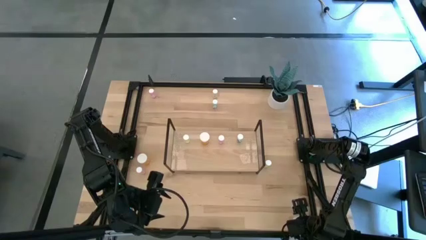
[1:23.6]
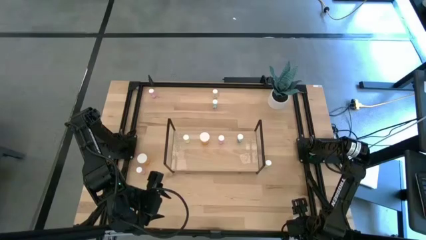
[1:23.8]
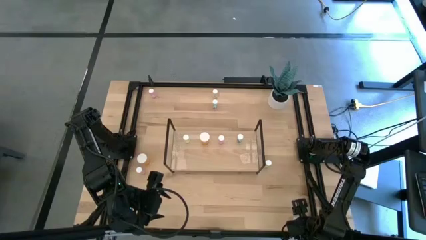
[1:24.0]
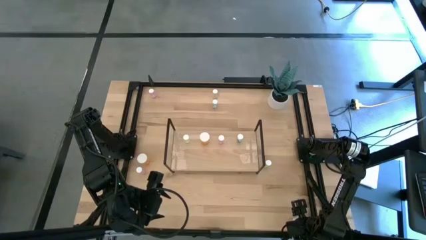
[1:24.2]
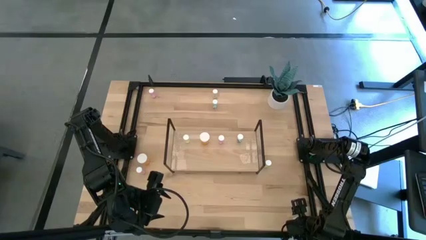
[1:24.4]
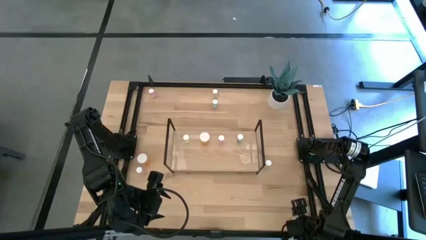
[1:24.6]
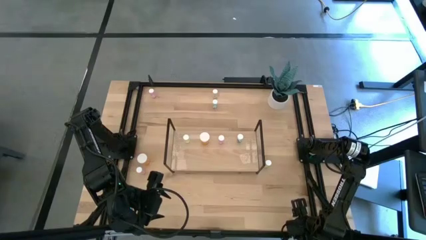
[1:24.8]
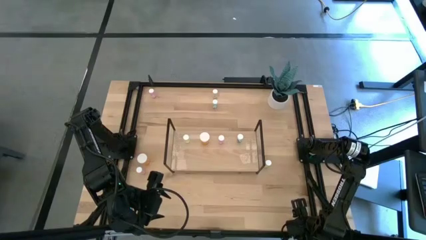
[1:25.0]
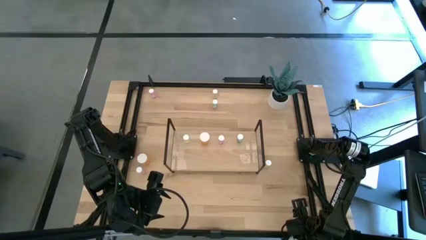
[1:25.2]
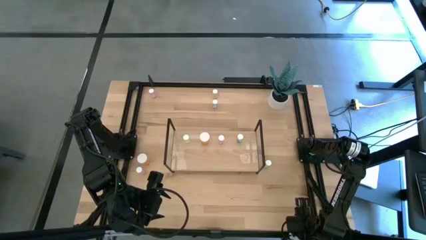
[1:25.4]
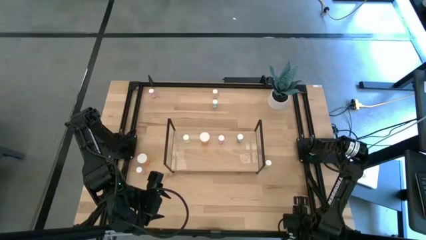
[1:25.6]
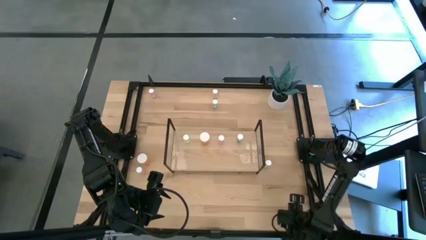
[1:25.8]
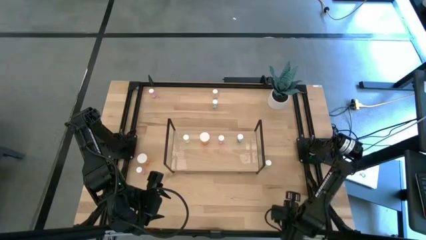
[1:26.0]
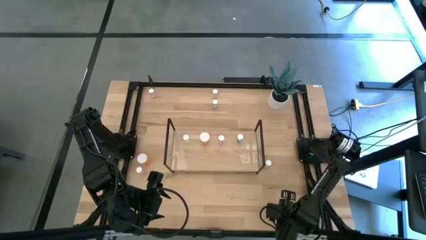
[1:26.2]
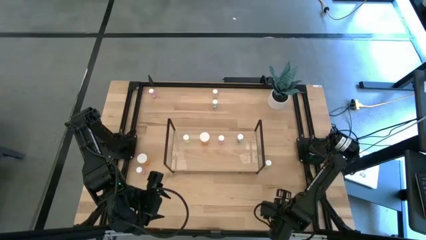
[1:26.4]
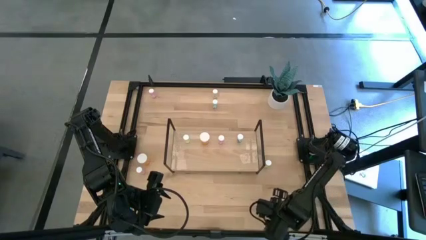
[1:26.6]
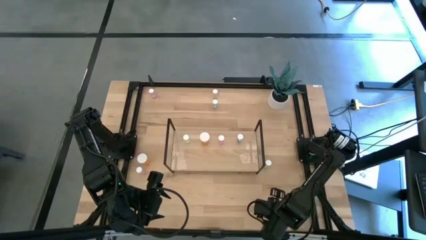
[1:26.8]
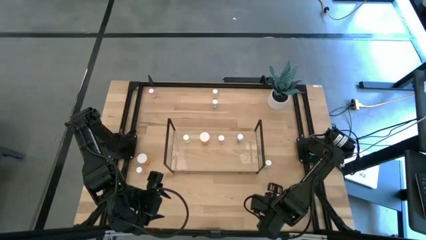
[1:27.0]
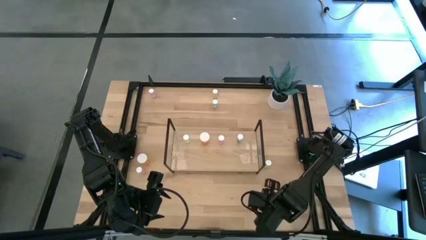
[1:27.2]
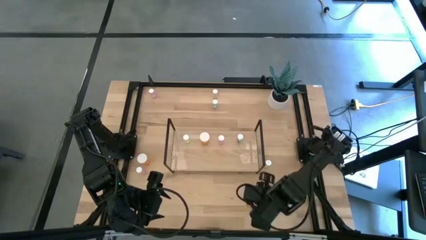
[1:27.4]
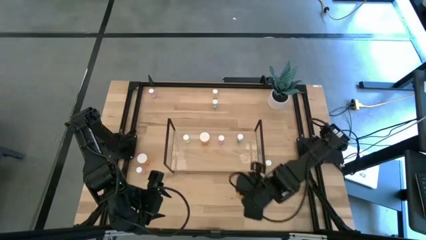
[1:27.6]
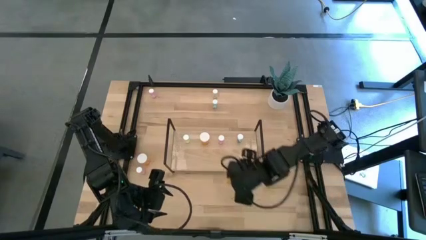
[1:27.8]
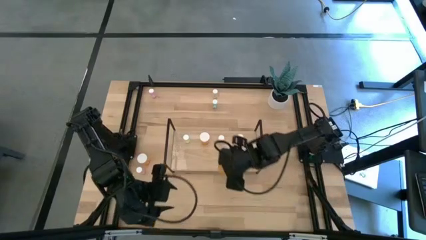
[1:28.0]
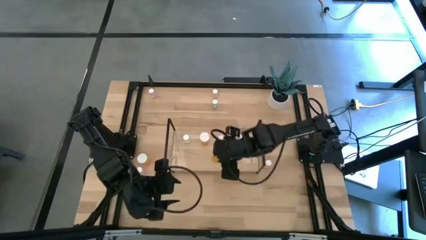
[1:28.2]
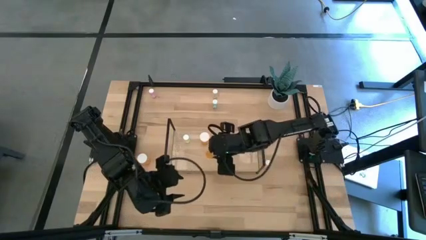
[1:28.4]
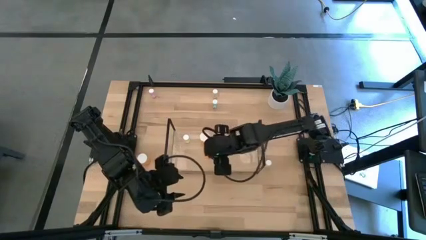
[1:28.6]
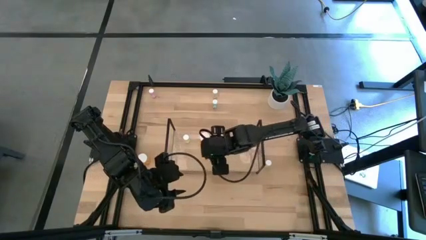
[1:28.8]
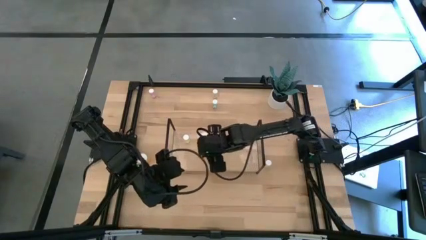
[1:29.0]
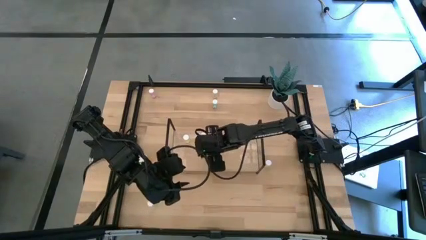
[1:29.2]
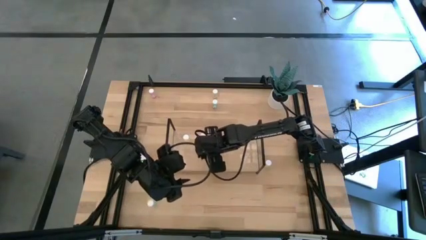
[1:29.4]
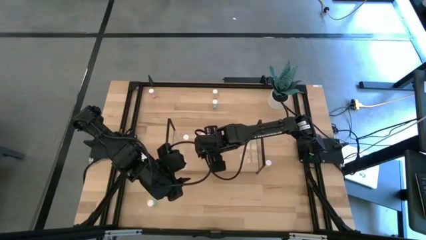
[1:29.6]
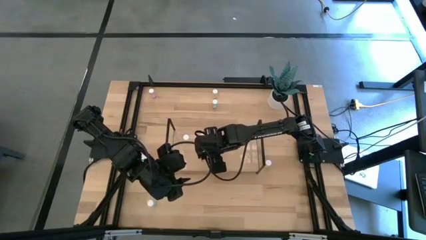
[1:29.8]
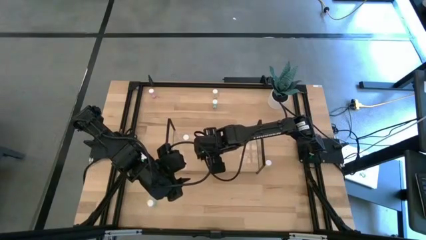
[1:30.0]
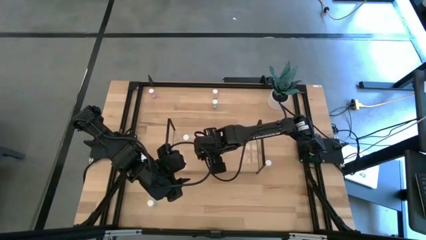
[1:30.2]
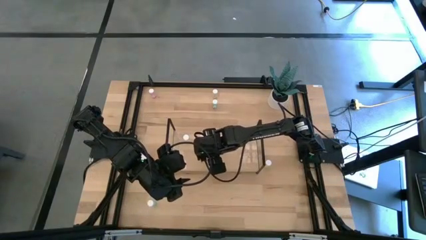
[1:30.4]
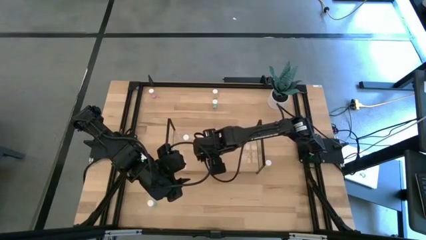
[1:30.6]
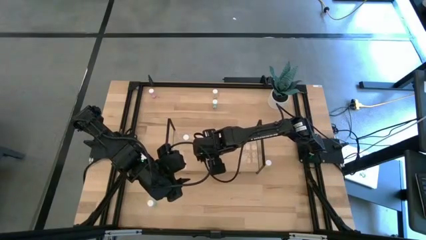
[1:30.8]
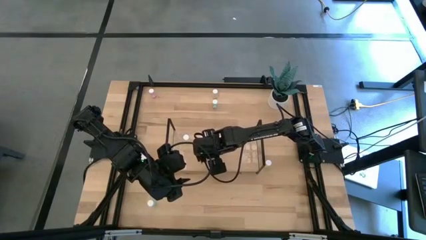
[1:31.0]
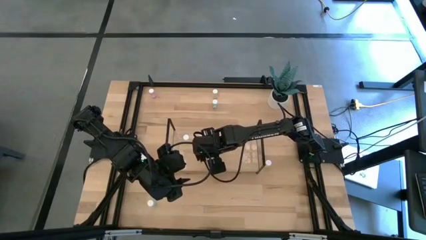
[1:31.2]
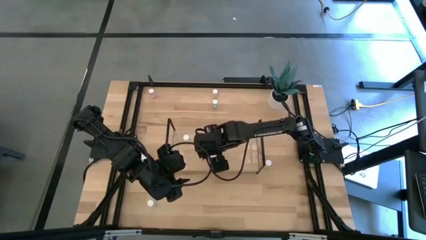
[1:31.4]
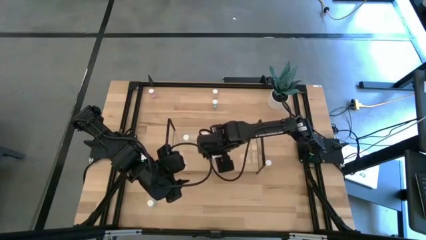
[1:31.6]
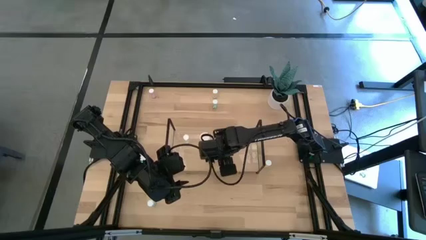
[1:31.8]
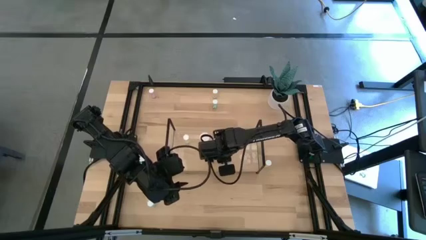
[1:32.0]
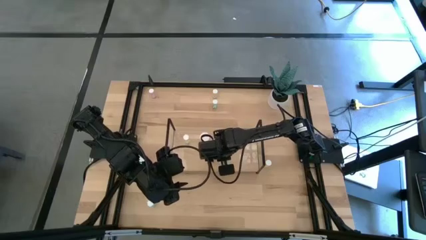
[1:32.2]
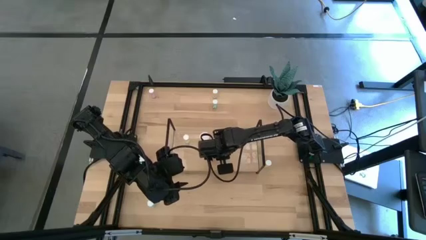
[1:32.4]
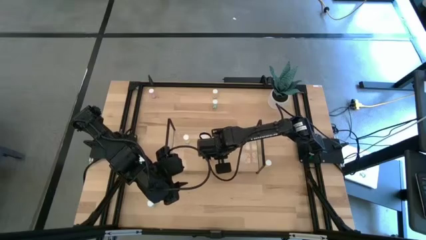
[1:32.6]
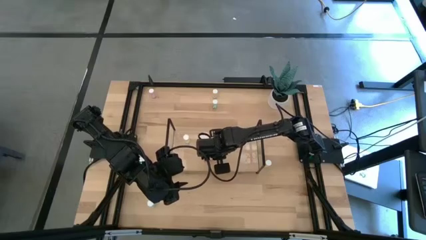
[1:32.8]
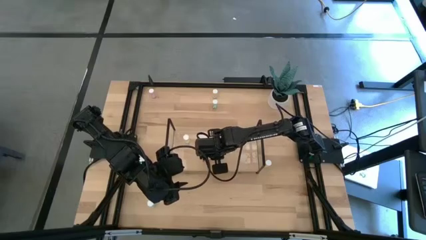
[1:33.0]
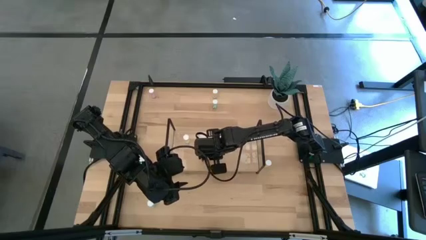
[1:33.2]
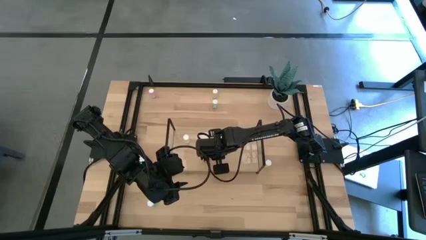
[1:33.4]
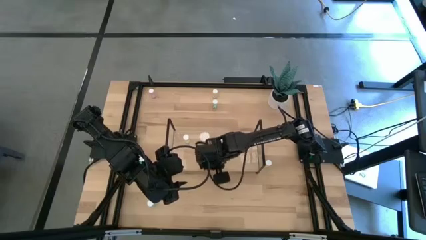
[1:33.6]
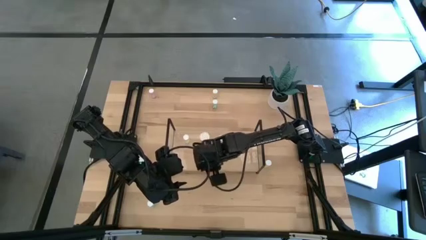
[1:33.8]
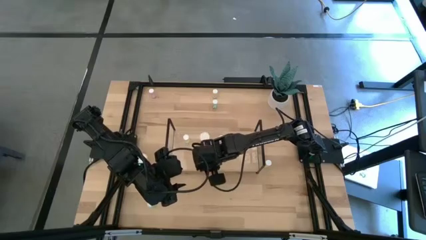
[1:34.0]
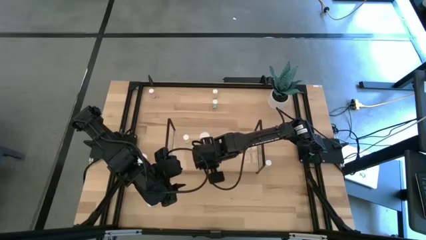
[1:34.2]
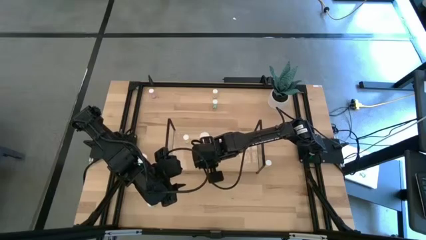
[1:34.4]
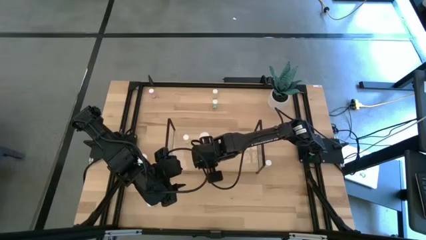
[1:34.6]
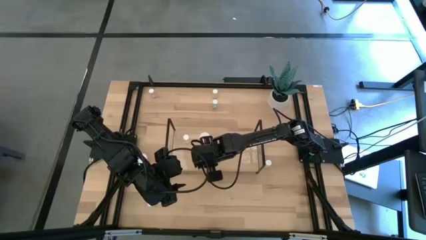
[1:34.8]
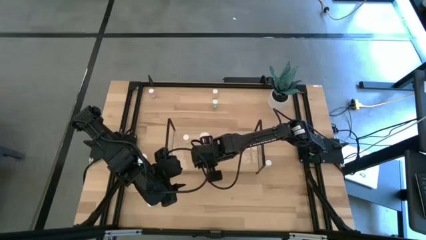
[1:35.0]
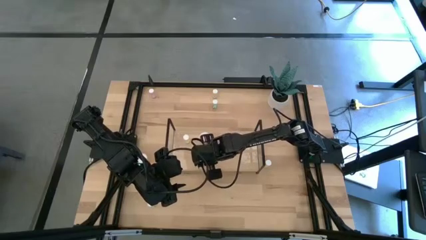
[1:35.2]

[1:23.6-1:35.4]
Task: Pick and place medicine bottles onto shelf by color
Put the bottom orange pill bottle aligned with the orange pill bottle on the shelf

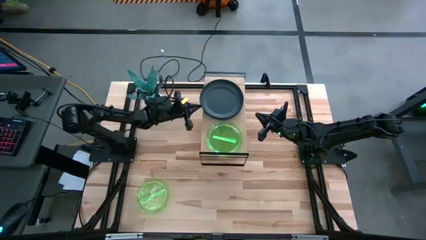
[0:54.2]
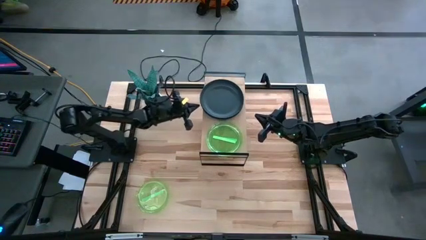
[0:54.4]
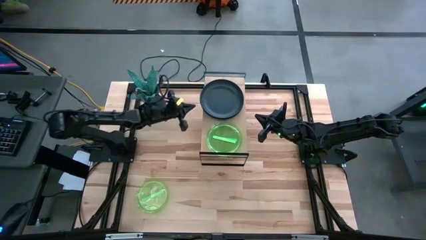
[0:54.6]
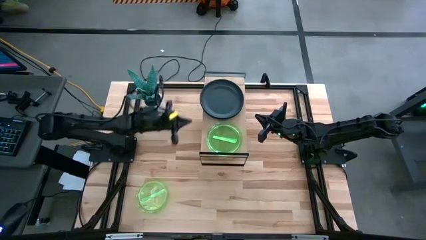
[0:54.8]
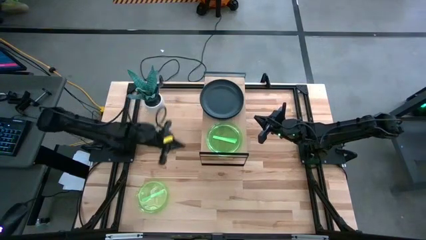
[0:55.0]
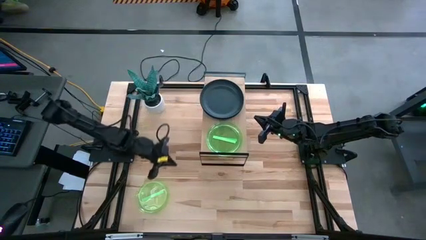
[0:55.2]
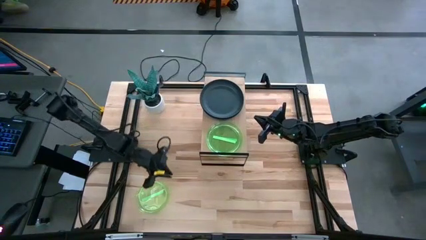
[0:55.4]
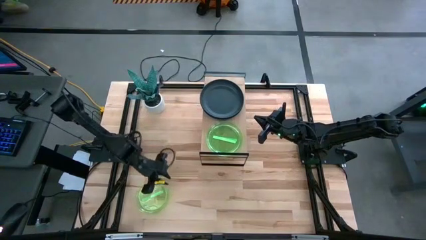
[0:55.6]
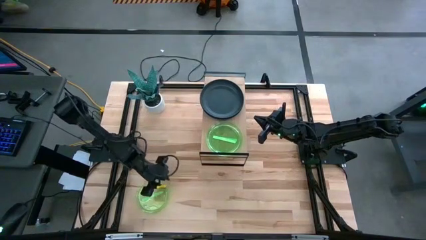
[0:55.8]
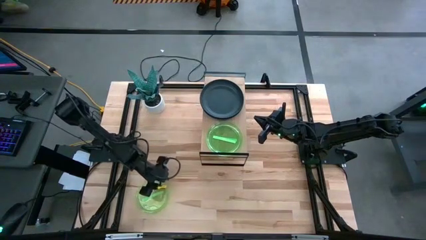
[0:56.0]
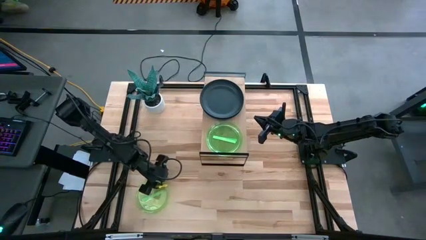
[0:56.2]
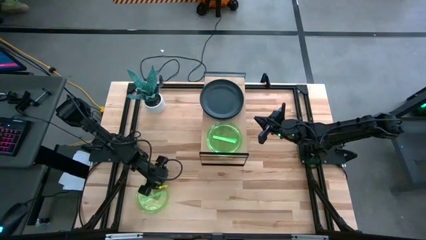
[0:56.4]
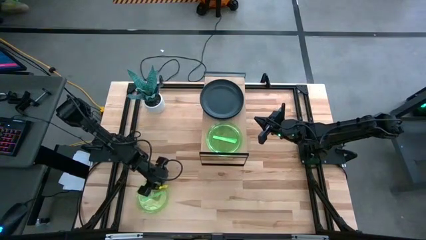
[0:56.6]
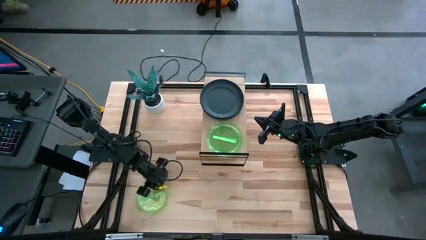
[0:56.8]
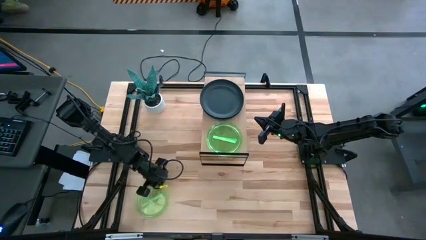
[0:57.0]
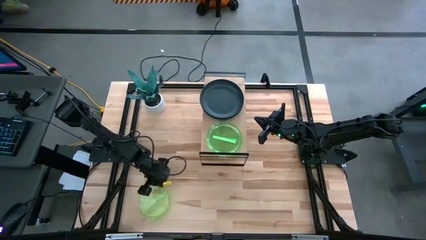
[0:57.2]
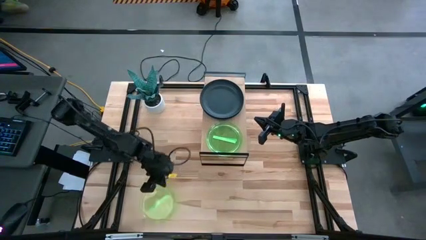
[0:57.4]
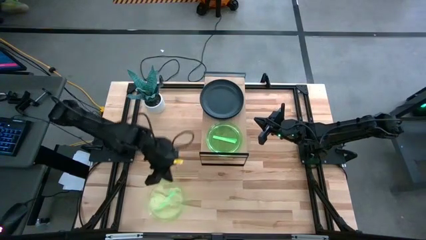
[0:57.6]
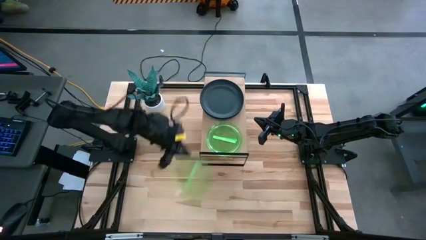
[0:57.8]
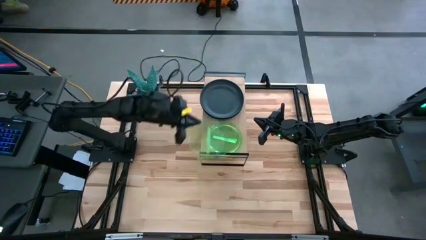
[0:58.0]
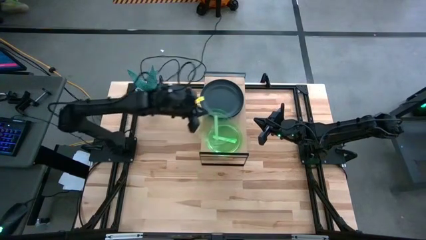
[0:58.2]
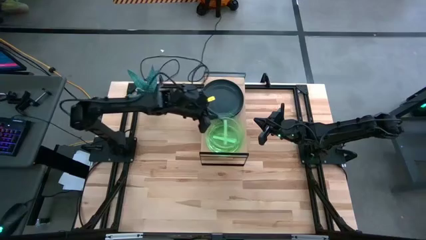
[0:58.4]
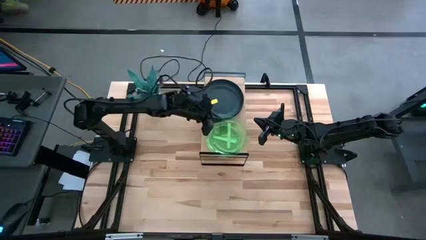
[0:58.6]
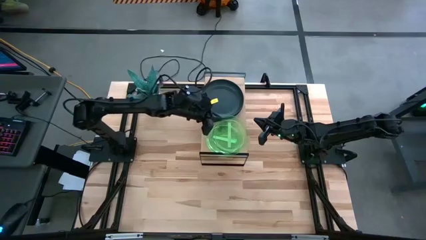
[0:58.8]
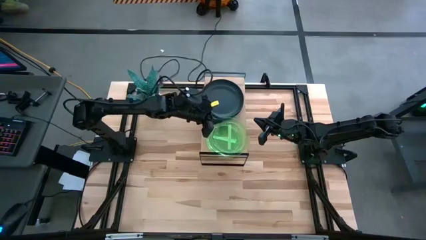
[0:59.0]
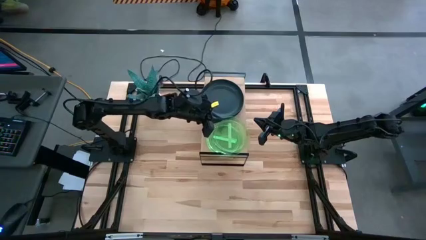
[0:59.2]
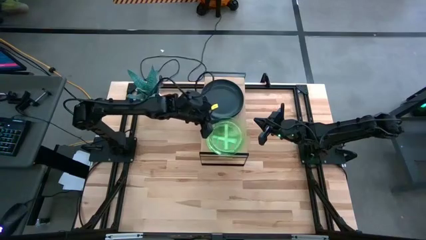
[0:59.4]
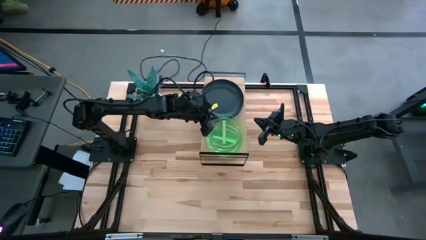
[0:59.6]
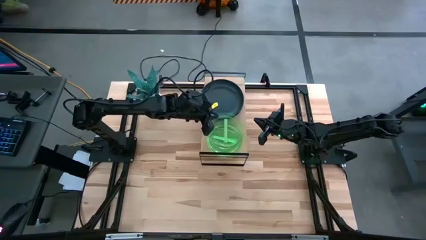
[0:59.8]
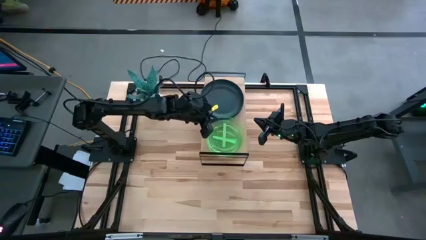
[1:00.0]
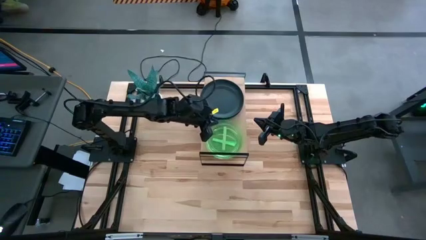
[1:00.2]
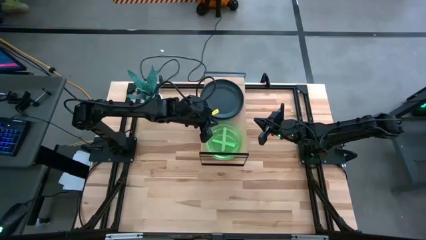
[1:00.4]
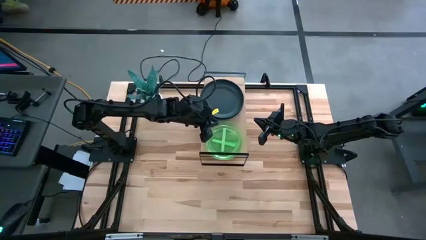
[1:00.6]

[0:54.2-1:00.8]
Task: Place and stack plates onto a shelf
Stack the green plate on top of the green plate on the shelf
